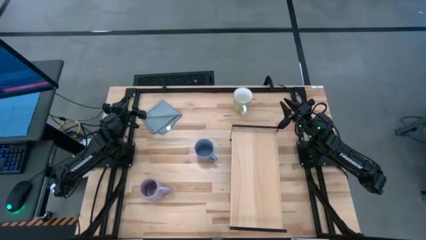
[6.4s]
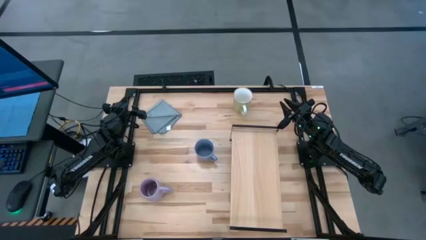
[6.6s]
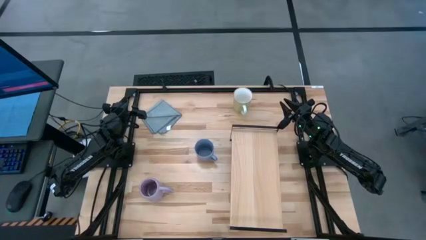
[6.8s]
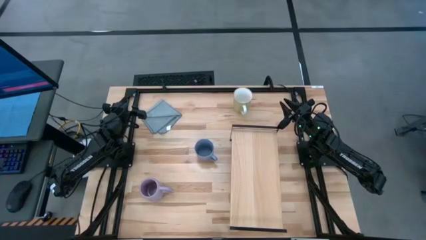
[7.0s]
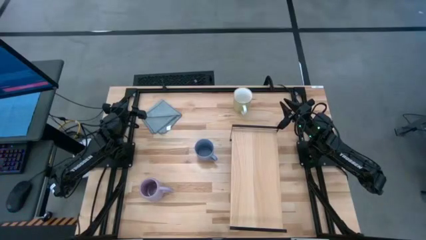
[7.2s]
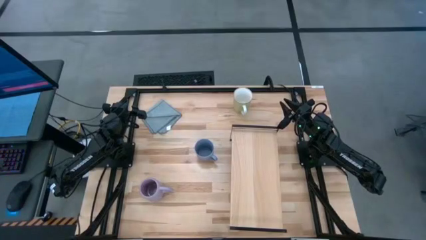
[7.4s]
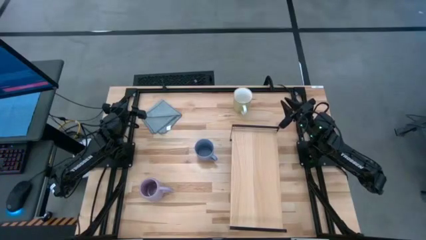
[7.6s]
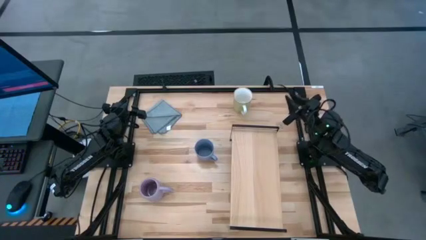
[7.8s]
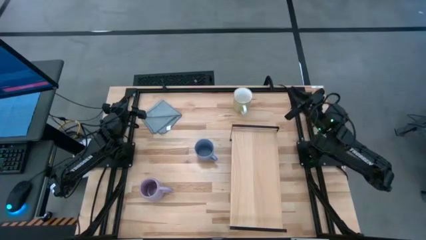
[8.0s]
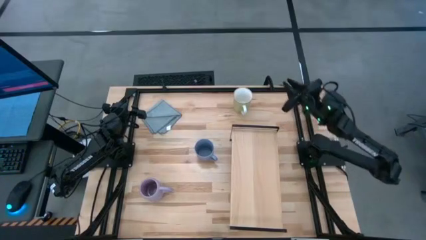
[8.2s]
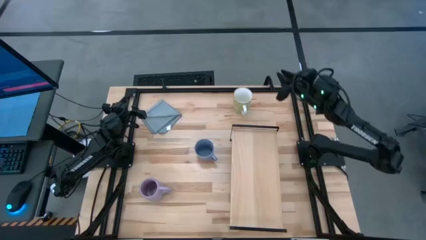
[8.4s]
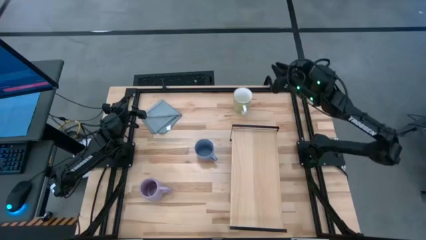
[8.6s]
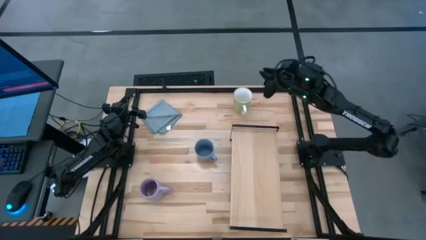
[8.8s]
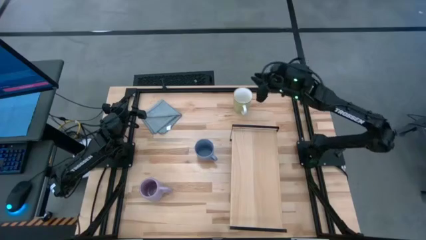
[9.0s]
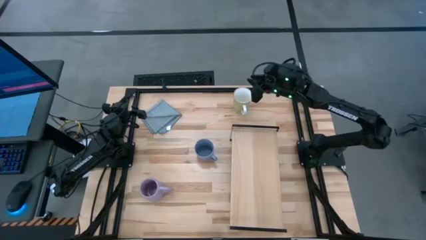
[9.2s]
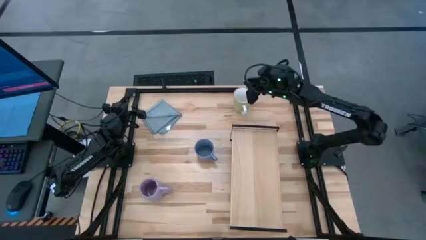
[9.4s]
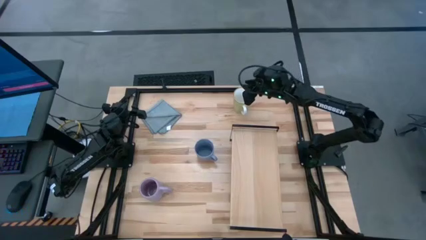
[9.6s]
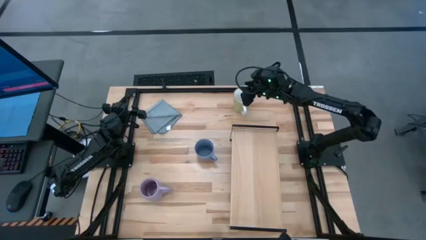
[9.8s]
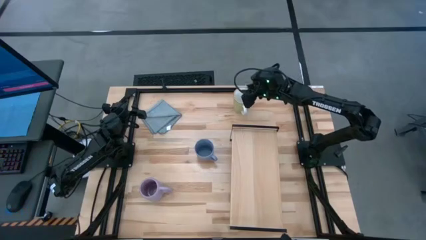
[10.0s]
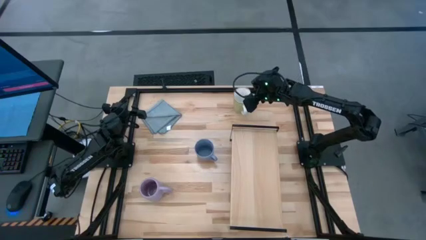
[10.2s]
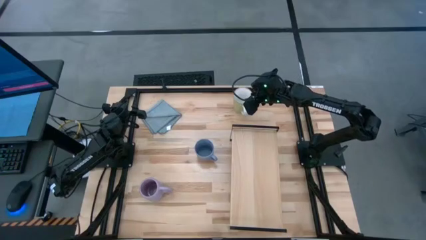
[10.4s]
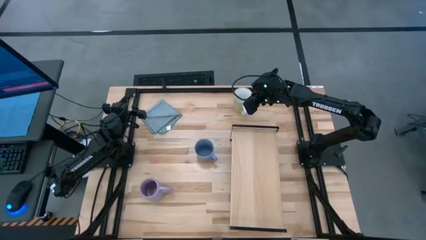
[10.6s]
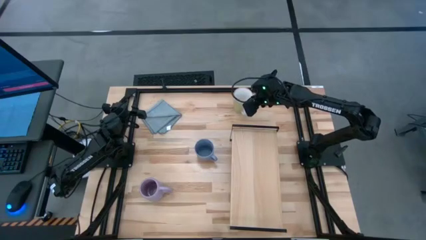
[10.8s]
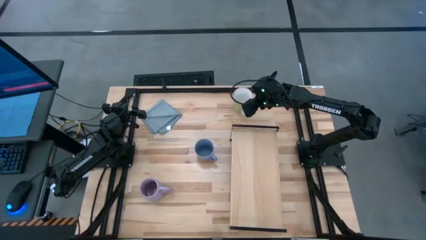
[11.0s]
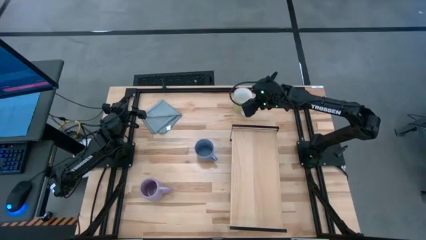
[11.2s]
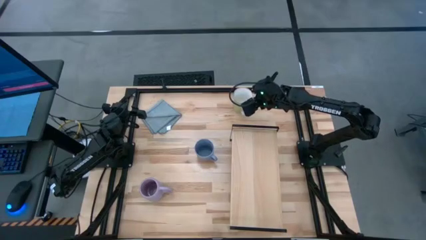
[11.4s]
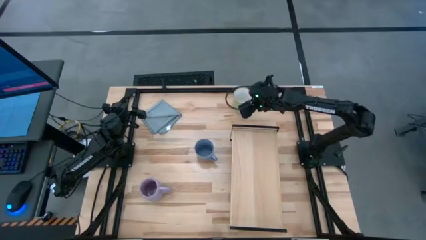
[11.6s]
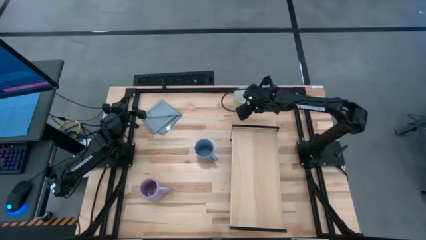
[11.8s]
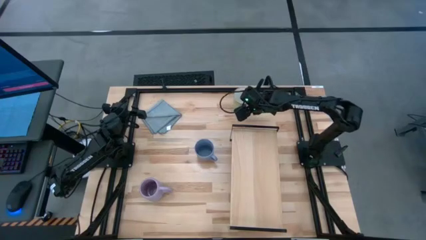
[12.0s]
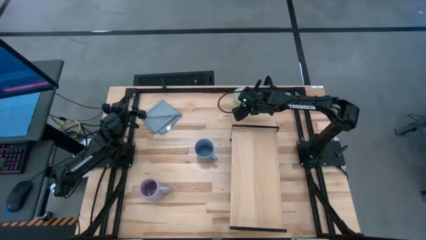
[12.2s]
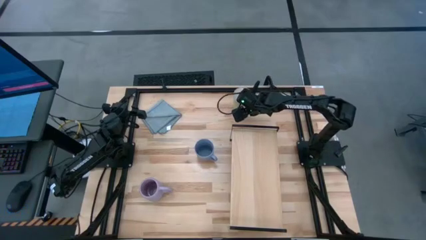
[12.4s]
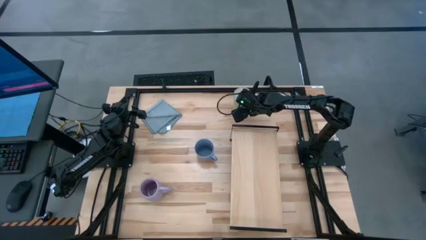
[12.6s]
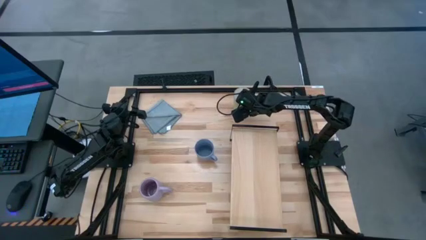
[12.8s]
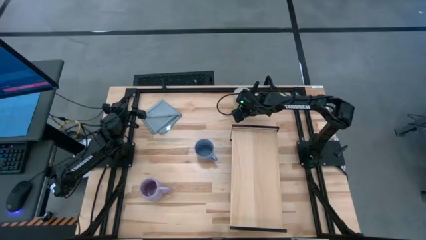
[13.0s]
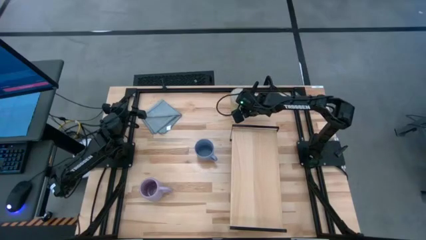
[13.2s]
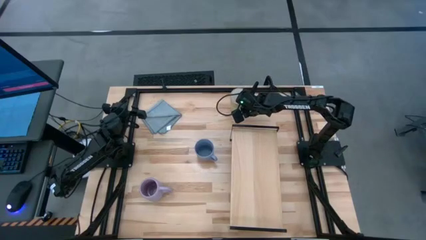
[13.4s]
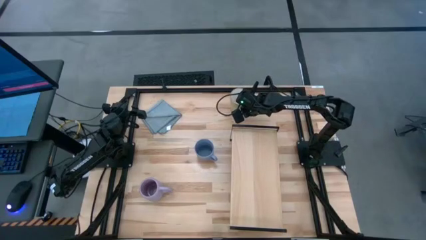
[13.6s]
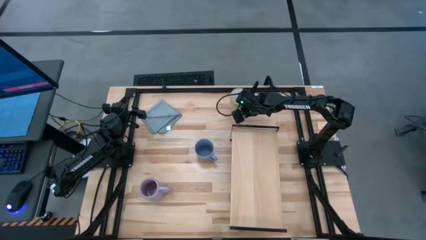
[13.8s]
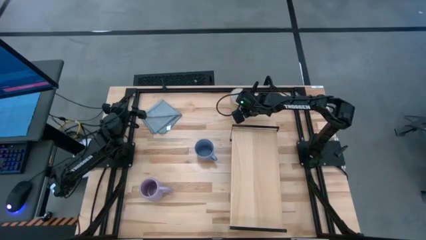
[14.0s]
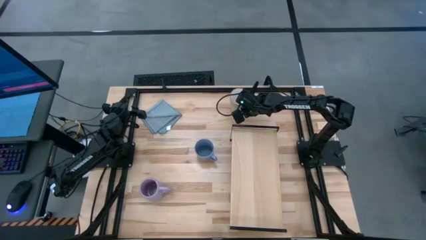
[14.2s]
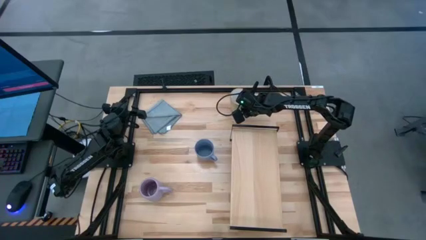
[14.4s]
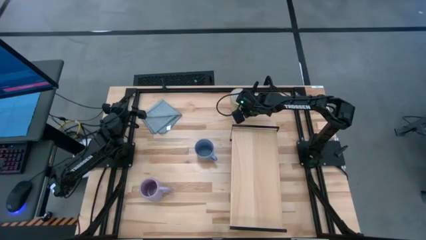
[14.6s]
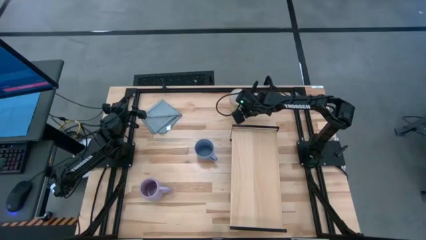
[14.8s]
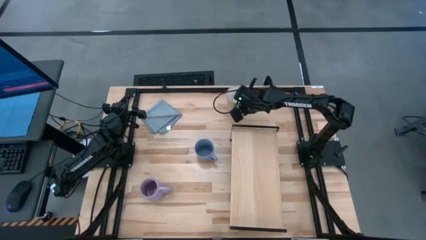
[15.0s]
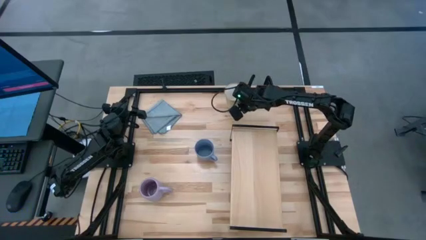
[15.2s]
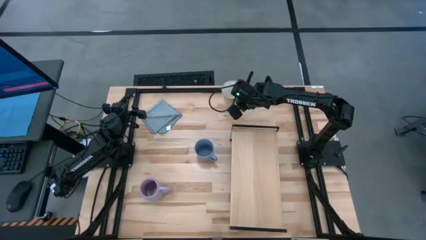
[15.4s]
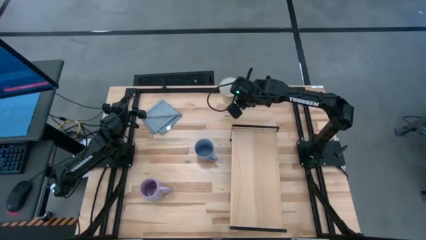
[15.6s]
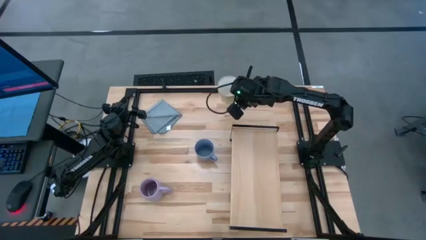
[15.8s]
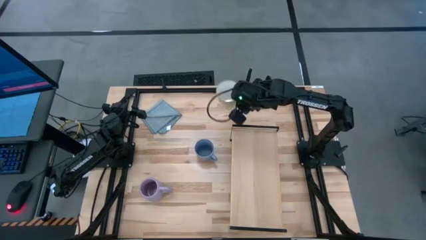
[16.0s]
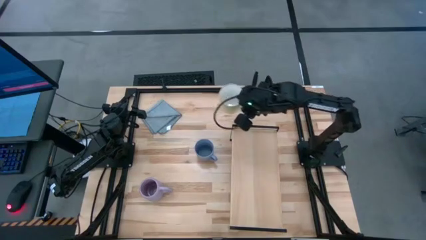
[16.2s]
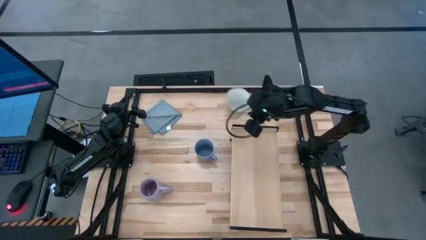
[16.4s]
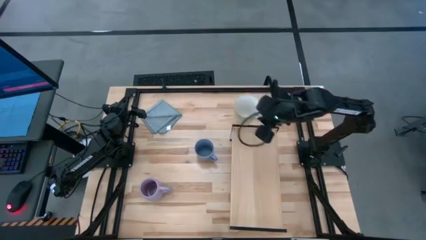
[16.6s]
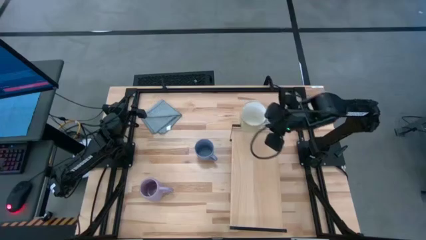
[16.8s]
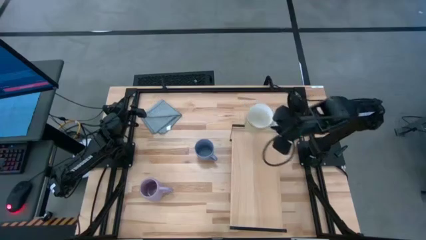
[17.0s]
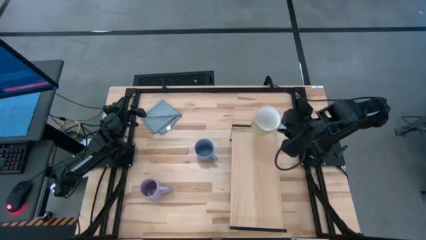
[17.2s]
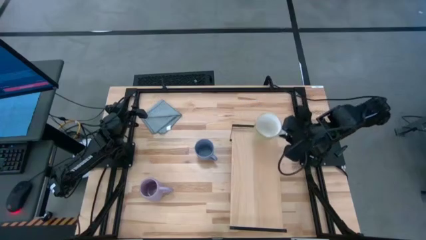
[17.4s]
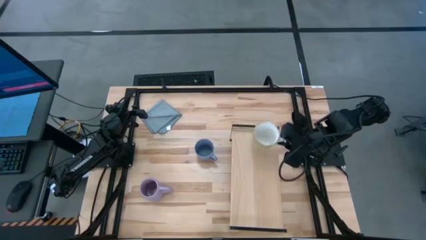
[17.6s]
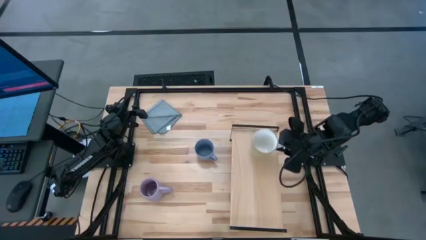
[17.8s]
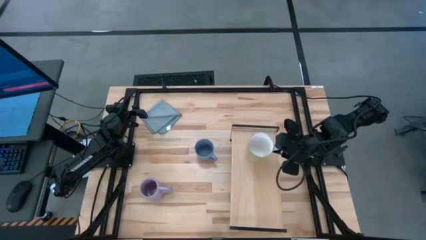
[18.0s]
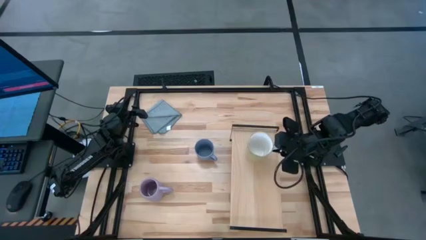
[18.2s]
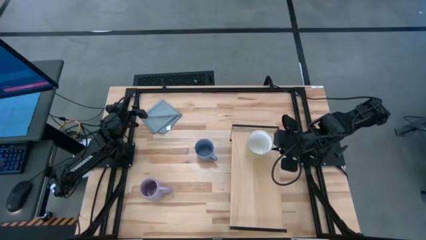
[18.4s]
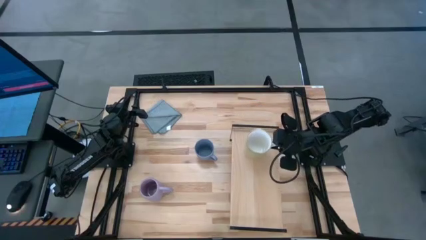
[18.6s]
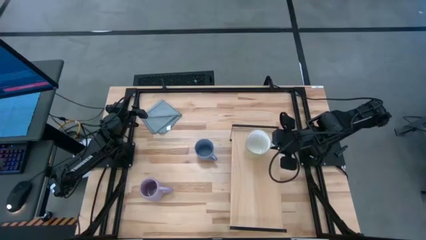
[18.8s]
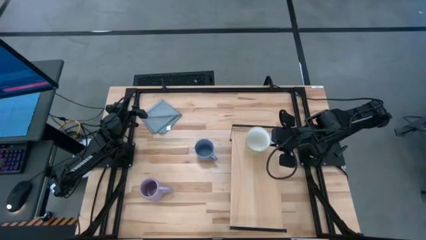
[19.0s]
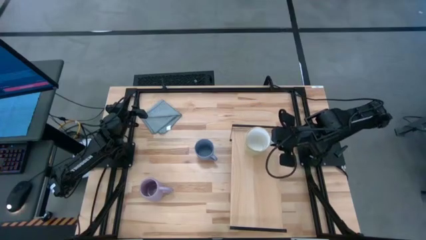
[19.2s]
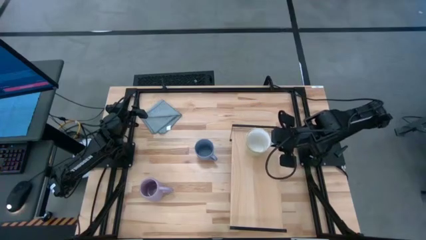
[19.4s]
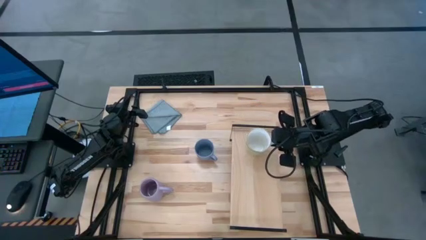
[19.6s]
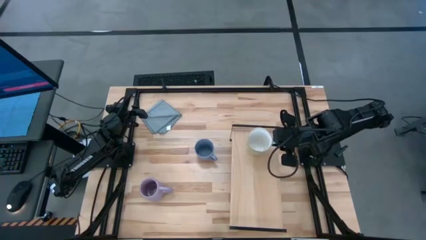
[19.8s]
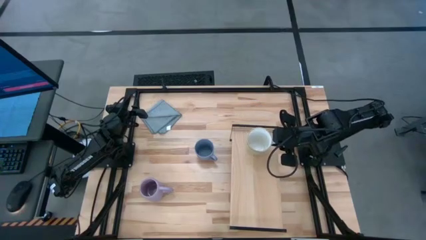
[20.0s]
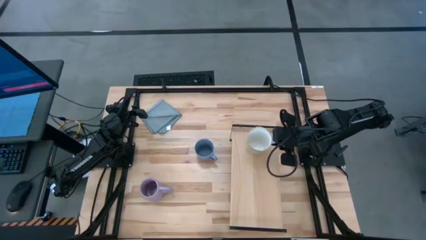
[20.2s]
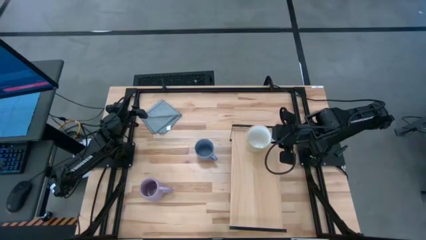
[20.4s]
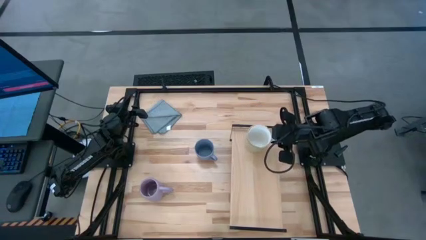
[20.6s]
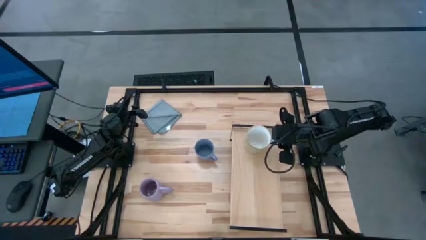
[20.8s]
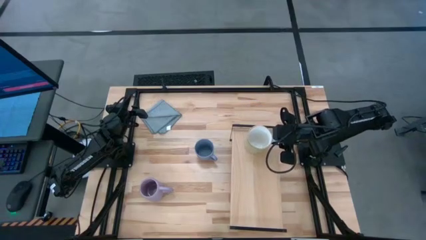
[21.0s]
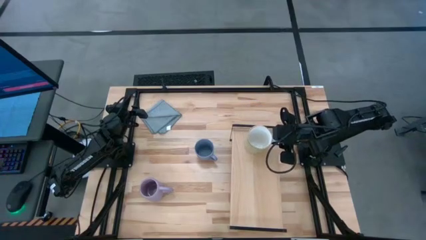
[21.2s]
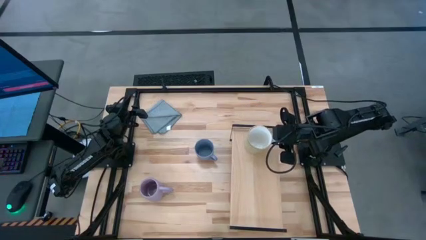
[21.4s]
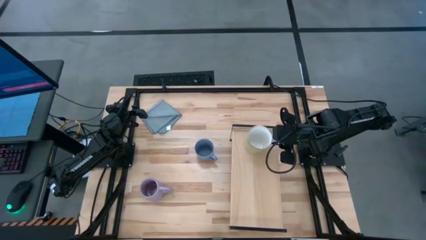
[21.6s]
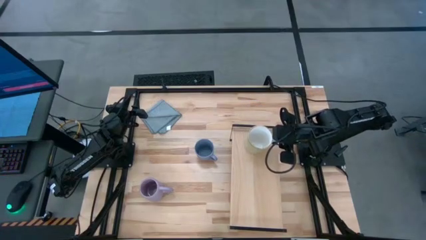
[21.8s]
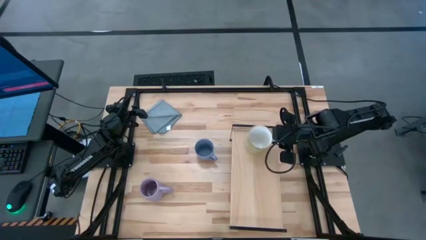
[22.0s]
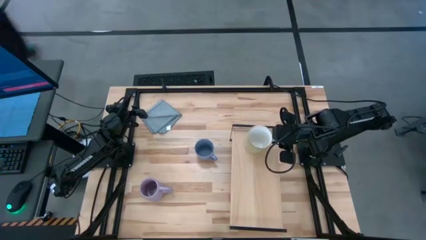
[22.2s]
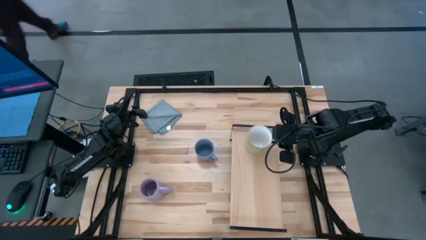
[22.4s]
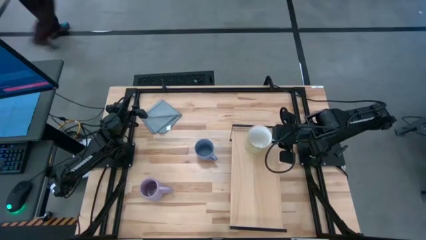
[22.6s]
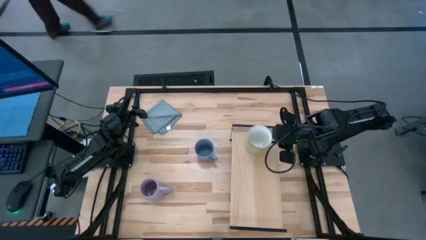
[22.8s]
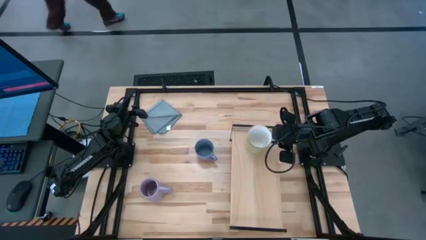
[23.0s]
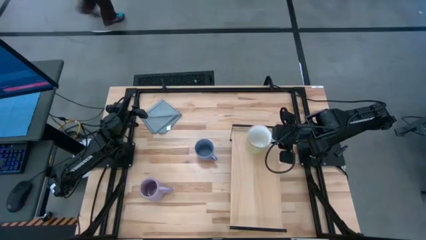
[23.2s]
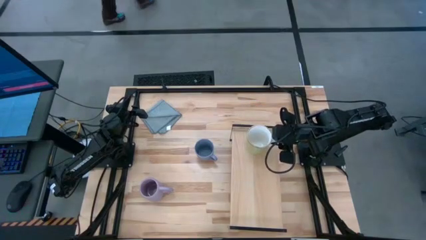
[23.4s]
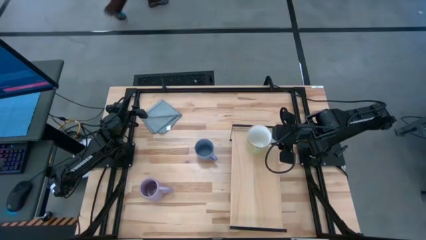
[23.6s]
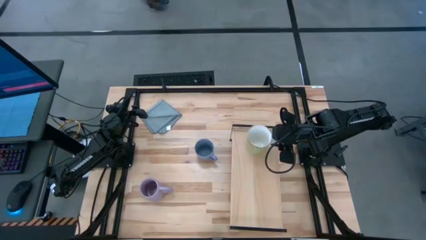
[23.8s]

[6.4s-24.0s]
Task: Stack small to large cups/mugs on shelf
Put the yellow mug on the shelf
